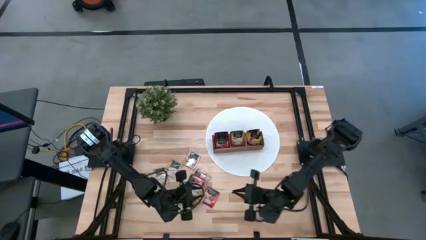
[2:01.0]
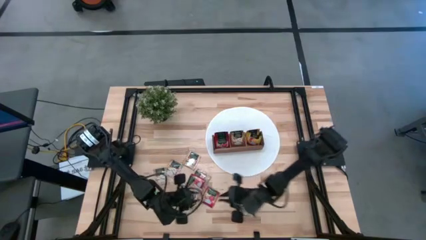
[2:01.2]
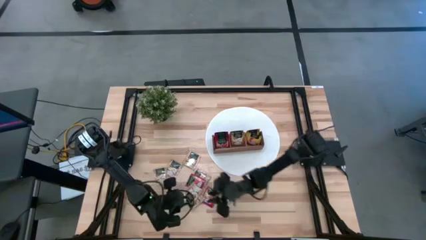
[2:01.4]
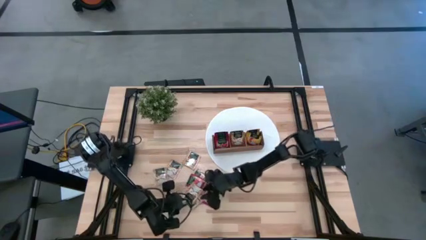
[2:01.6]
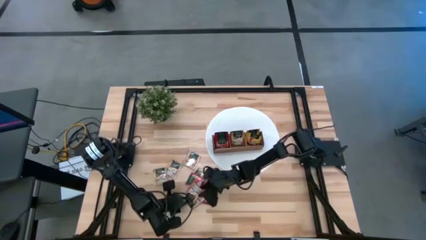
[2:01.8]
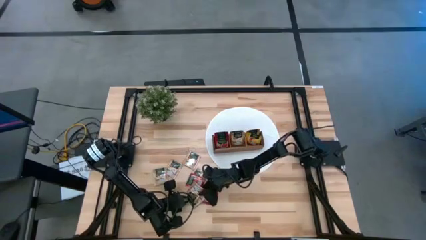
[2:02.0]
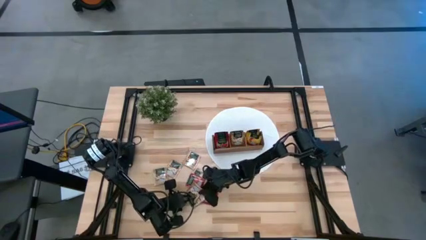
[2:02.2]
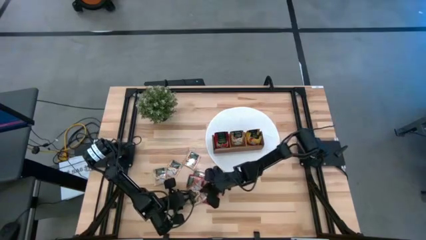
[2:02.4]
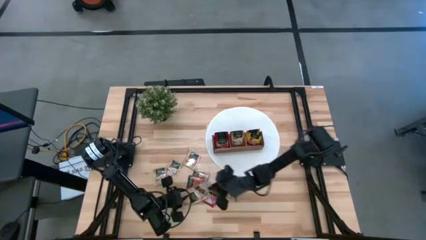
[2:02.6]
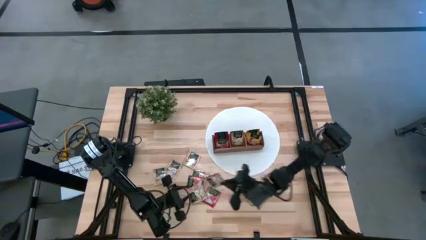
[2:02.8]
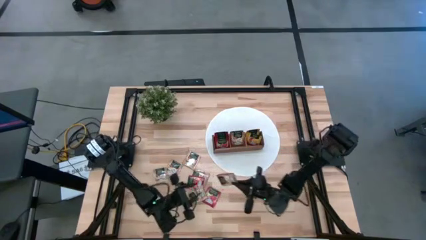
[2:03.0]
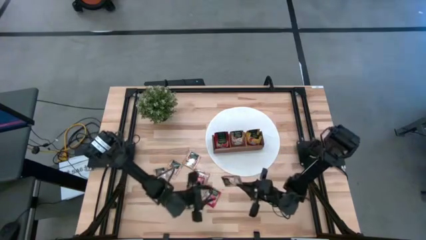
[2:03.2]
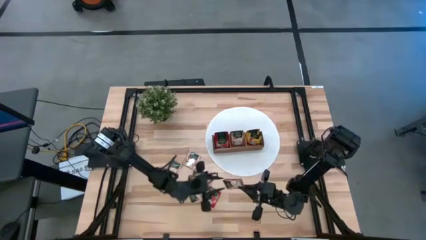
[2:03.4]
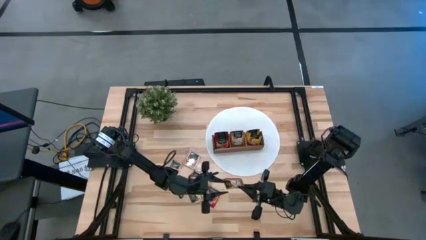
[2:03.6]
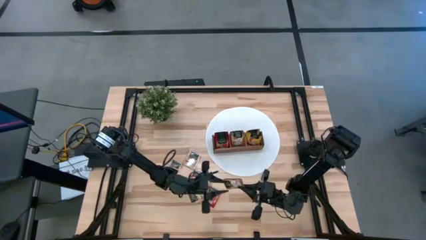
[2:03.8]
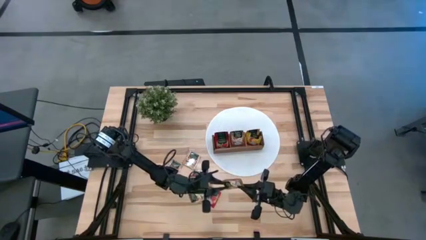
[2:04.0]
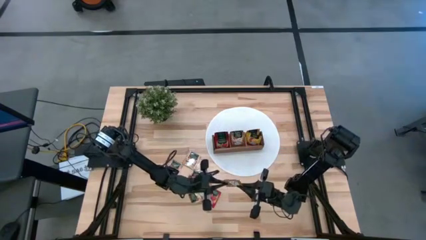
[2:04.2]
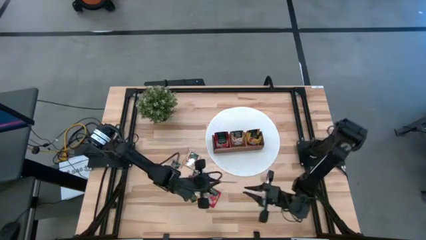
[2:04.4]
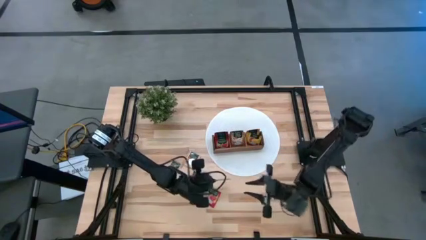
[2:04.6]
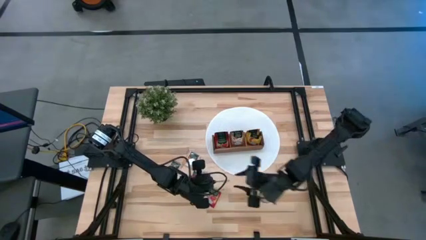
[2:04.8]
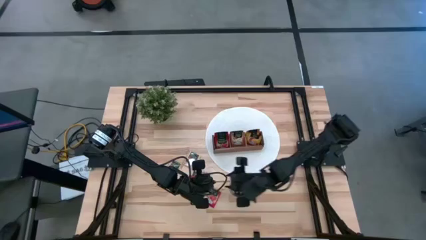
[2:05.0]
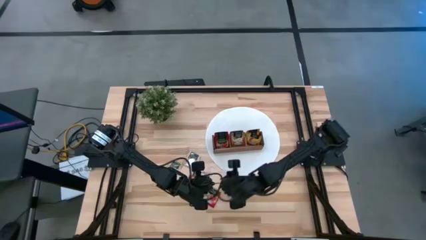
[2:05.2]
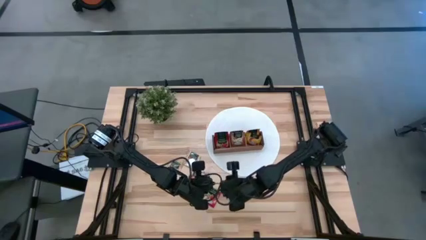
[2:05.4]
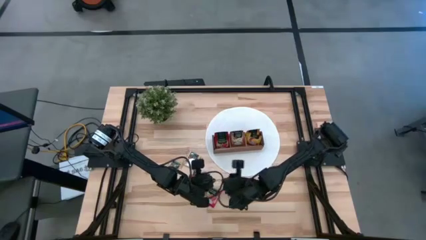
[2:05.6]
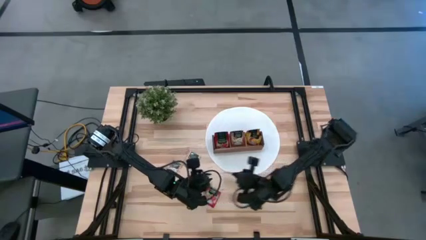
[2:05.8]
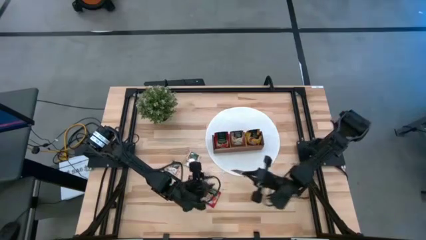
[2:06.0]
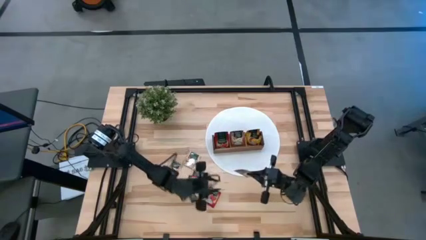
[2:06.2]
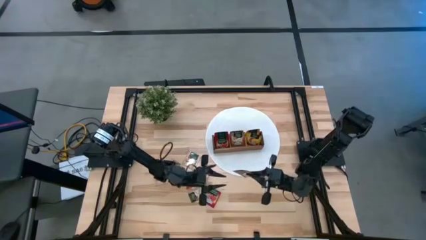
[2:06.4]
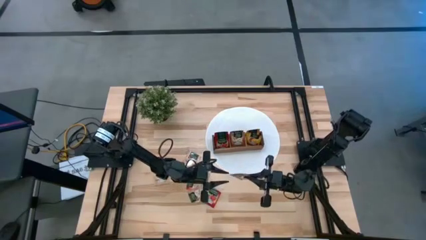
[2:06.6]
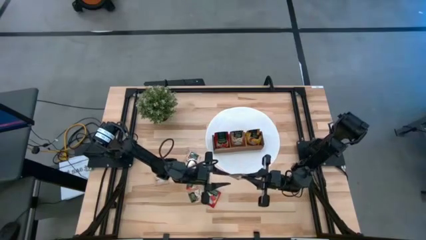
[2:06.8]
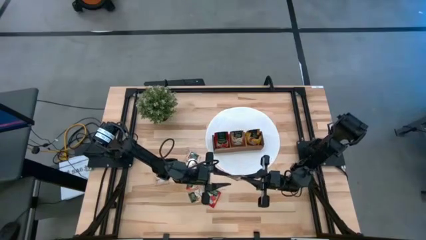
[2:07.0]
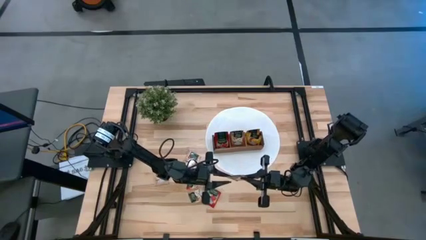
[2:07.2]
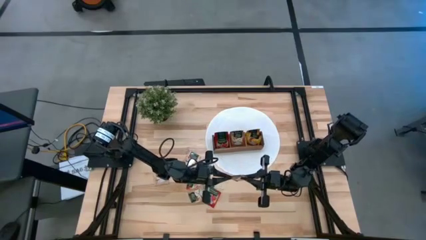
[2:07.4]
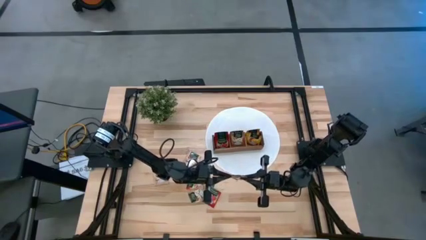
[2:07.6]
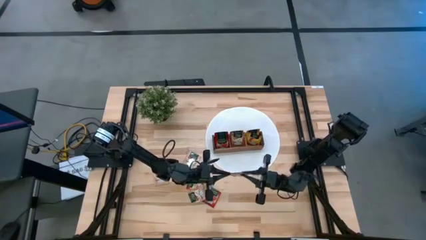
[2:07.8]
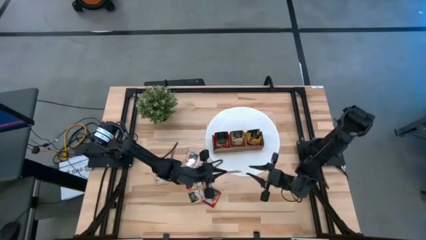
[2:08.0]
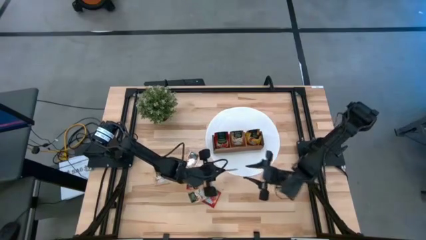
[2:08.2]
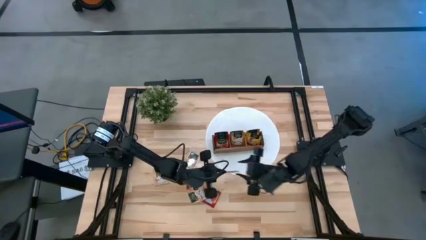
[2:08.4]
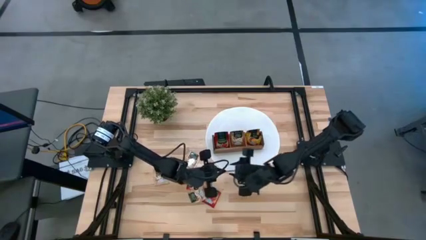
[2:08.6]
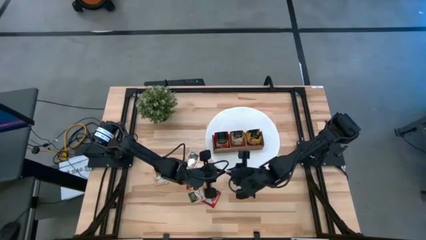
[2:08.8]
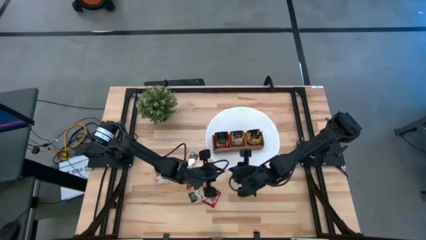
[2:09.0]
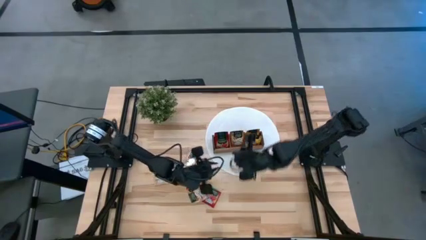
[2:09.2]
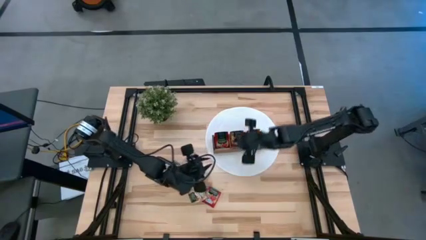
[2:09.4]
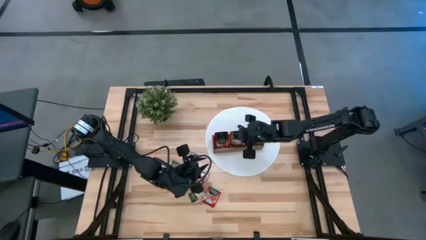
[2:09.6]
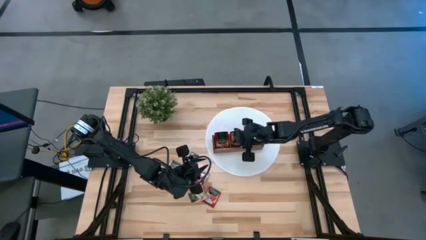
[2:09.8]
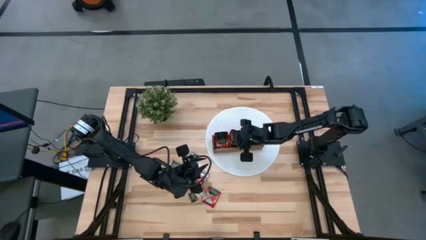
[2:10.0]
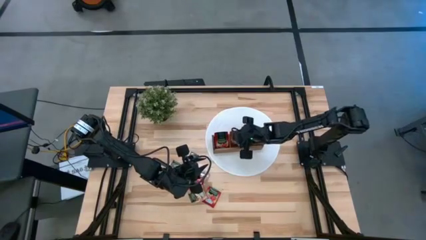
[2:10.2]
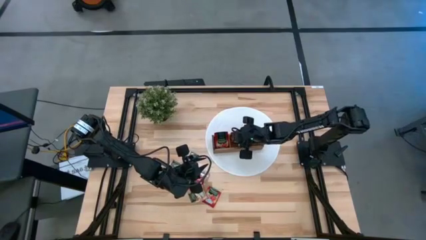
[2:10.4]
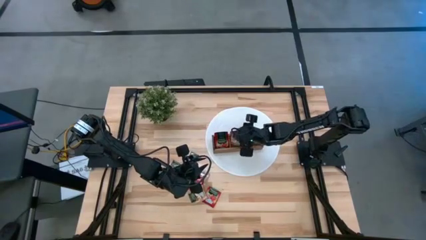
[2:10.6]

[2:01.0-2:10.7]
Task: Pick & Place Tea
Put the brown tea bag into the middle section of the wooden organizer

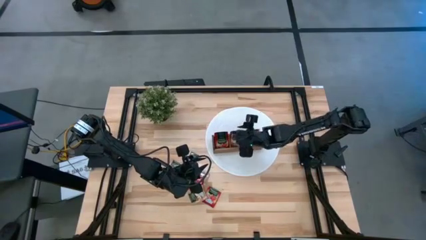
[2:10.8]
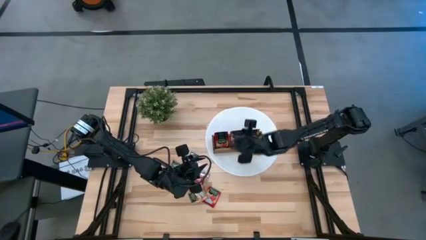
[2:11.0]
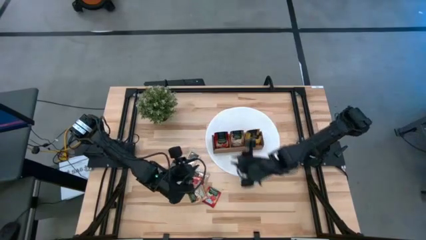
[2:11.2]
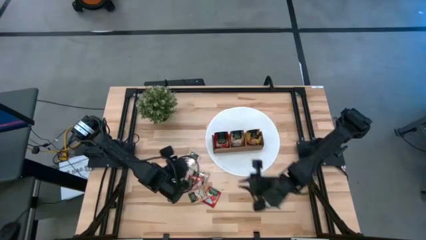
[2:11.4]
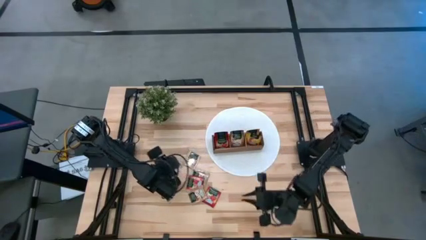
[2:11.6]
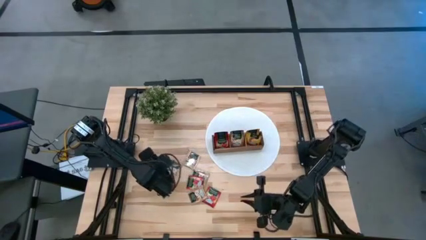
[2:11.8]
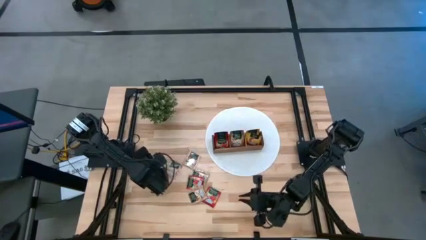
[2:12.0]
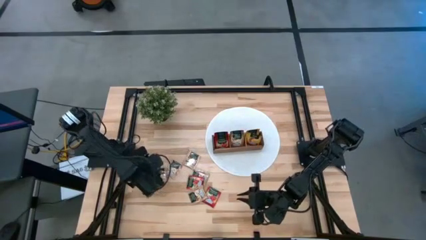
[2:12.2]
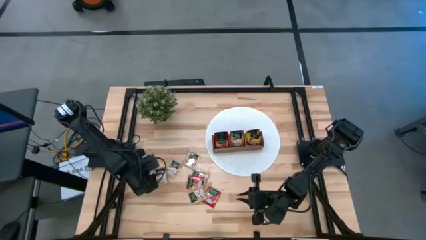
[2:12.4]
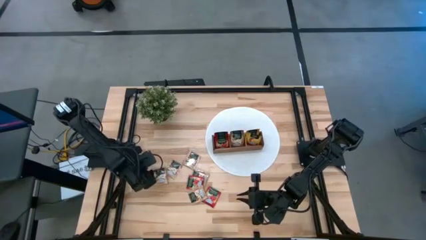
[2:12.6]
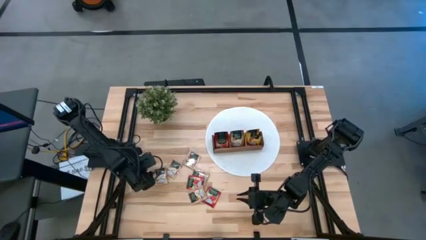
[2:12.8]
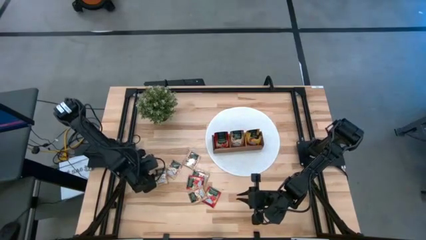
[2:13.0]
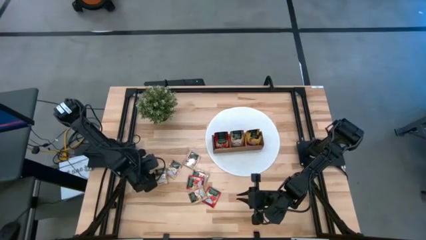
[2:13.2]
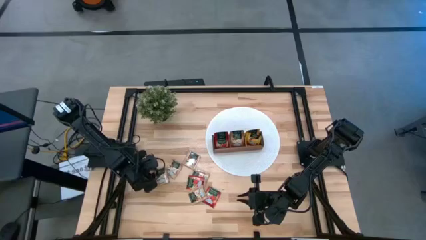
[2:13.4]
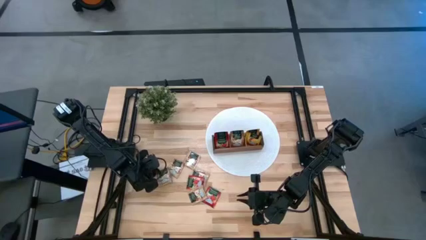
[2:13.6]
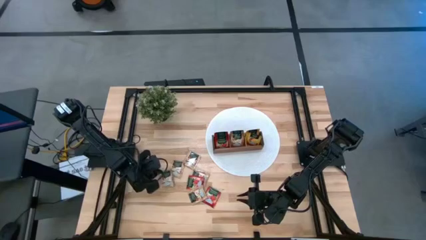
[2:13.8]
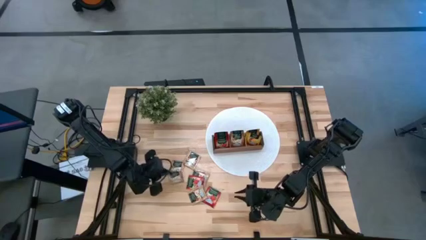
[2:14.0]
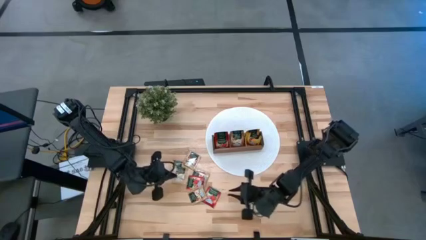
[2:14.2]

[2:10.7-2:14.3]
Put the brown tea bag into the middle section of the wooden organizer

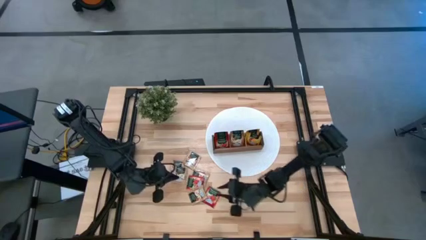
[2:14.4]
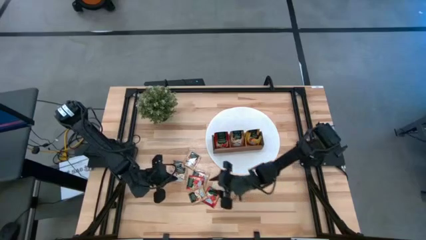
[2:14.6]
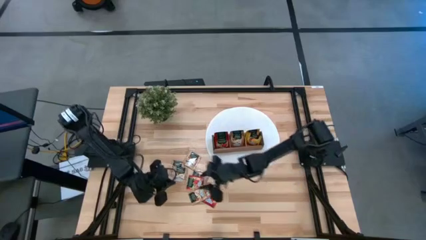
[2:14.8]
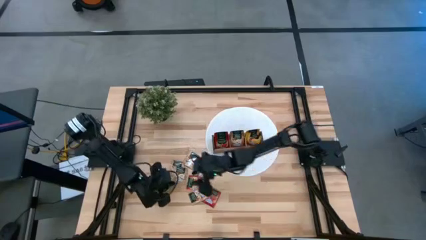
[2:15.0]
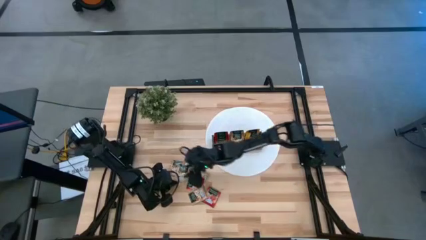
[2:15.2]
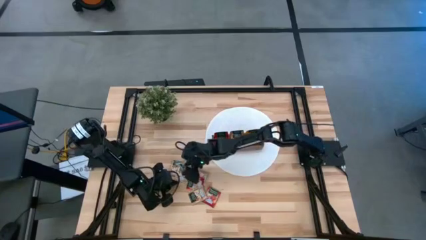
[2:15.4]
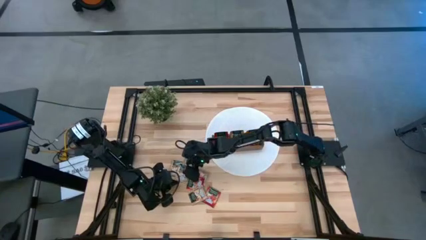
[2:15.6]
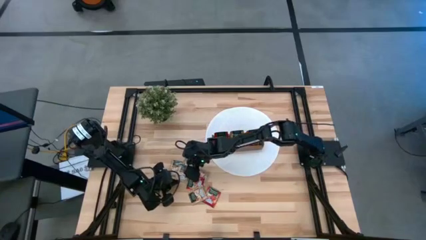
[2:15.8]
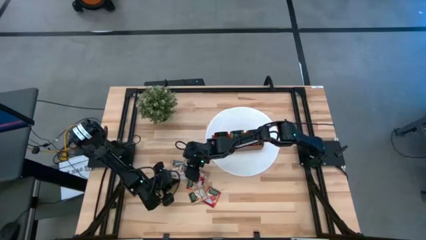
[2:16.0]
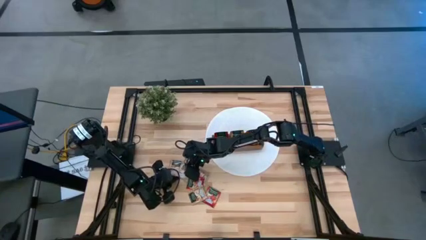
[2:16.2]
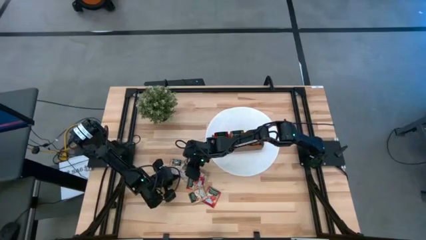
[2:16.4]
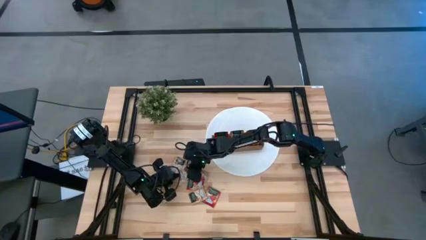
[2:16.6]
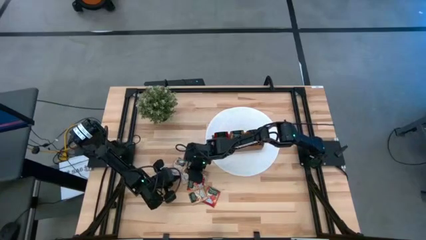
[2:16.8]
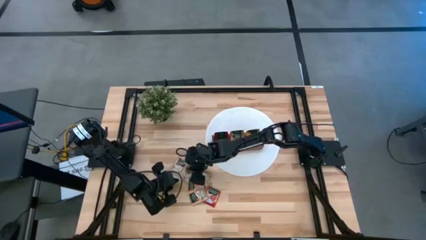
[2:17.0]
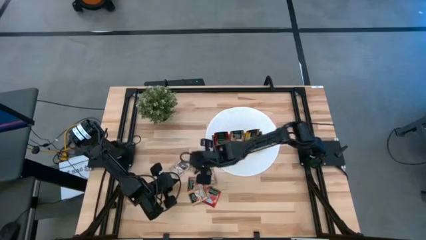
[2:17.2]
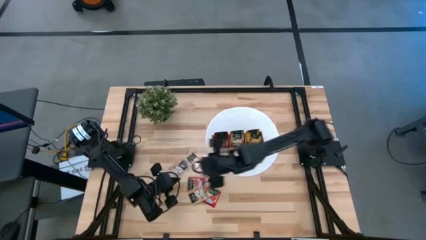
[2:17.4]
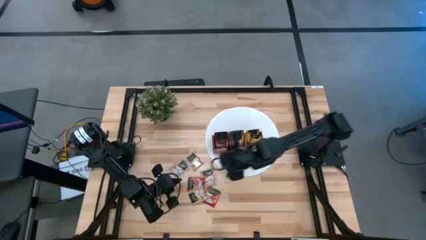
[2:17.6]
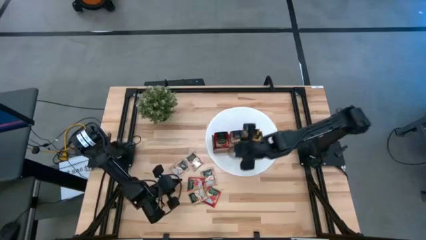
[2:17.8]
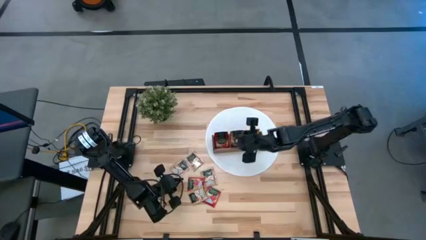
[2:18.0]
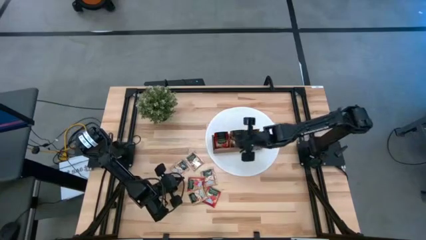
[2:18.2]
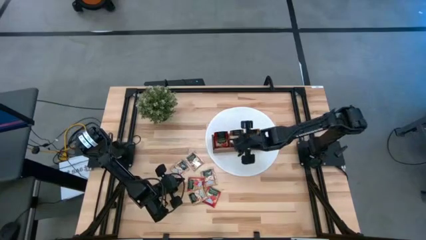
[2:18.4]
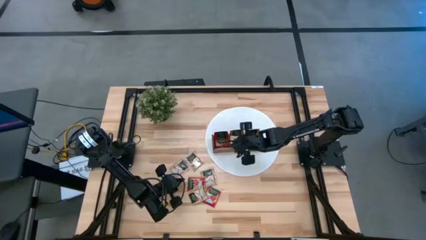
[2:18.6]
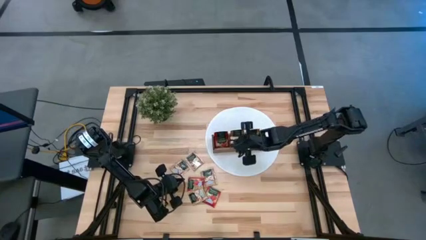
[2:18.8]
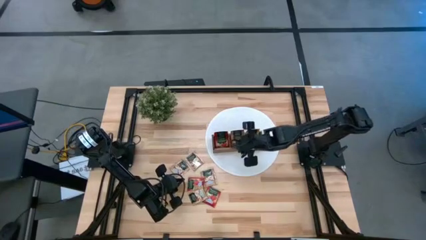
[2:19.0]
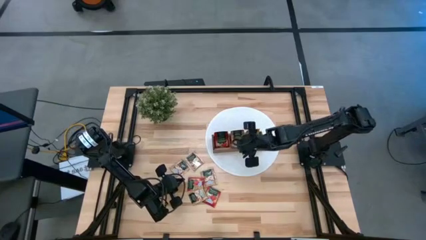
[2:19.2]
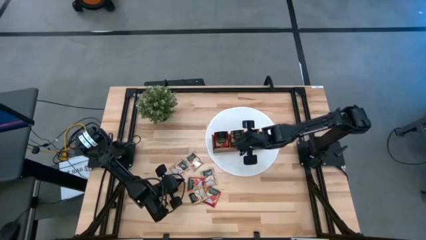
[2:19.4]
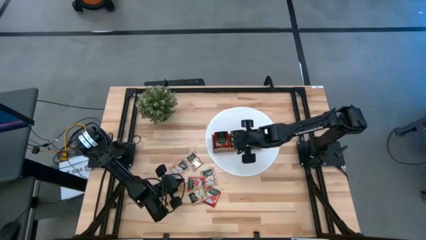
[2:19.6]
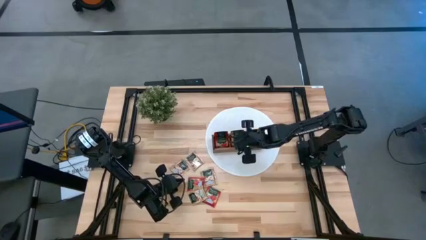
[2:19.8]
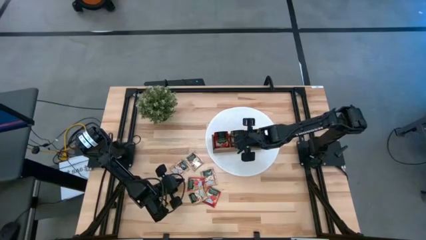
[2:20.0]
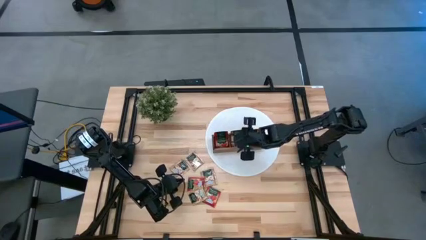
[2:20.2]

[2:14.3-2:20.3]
Put the brown tea bag into the middle section of the wooden organizer
